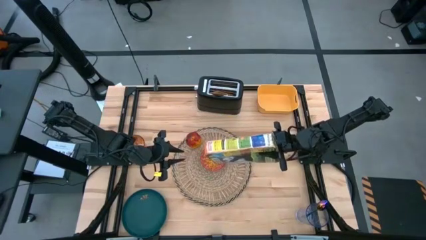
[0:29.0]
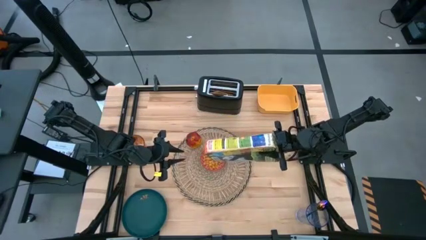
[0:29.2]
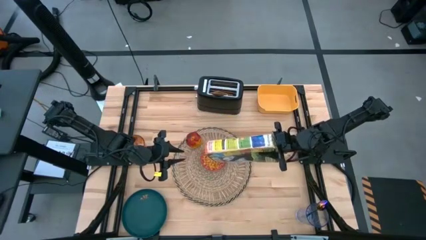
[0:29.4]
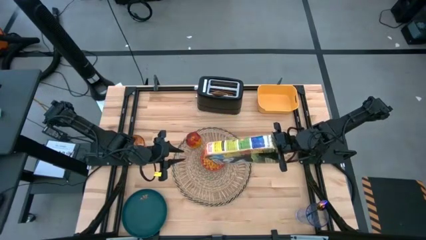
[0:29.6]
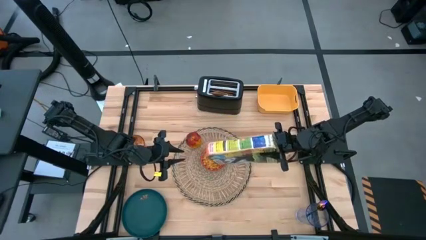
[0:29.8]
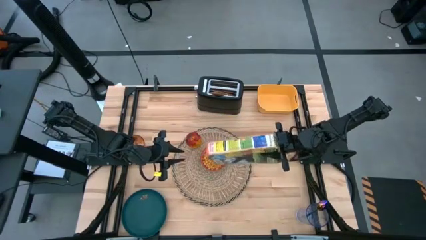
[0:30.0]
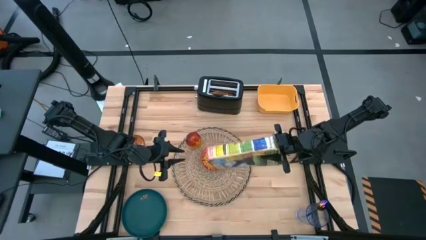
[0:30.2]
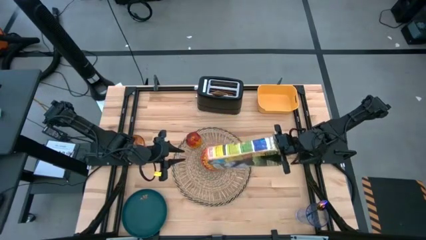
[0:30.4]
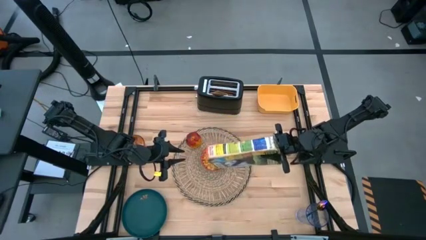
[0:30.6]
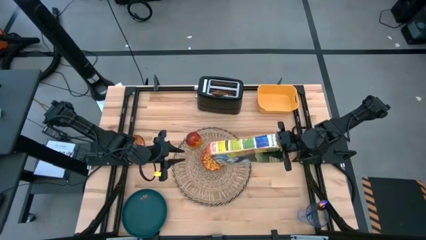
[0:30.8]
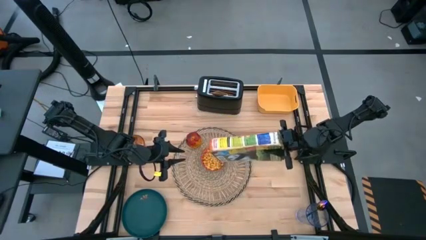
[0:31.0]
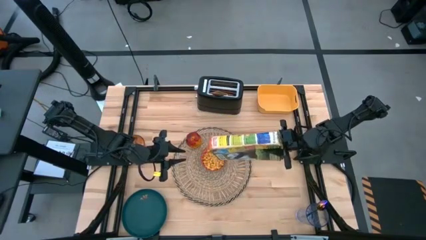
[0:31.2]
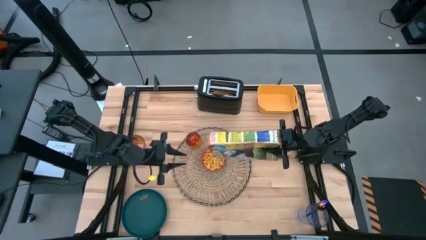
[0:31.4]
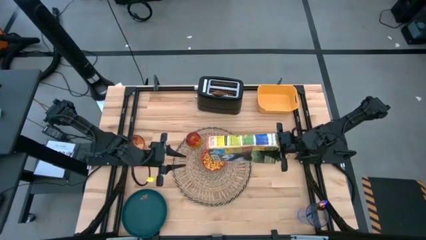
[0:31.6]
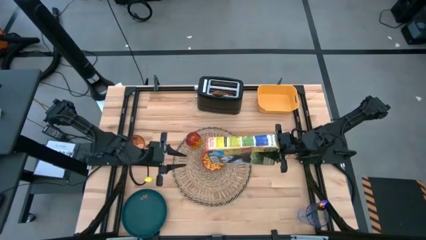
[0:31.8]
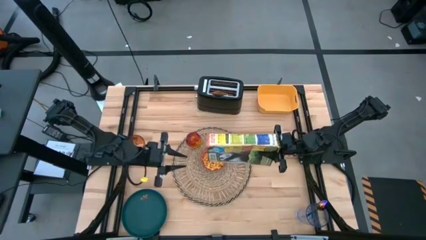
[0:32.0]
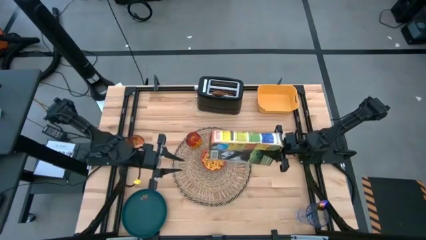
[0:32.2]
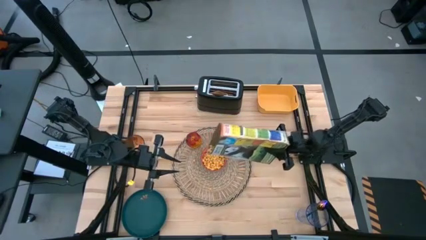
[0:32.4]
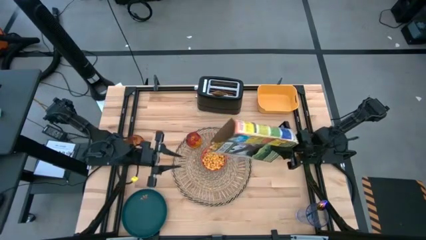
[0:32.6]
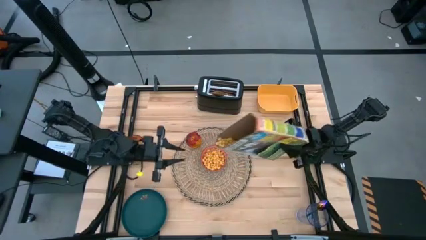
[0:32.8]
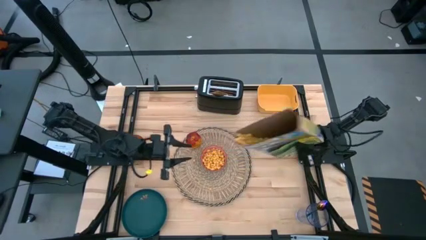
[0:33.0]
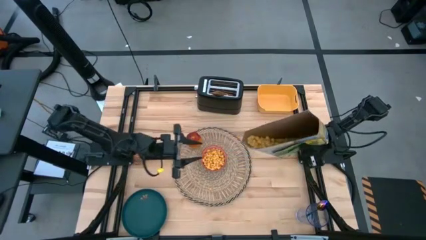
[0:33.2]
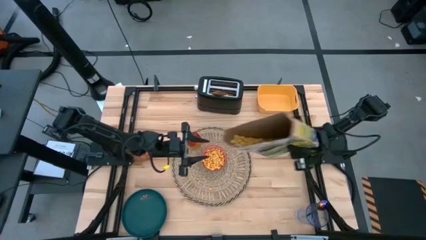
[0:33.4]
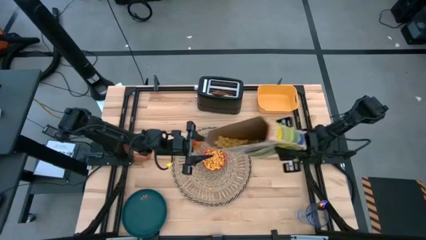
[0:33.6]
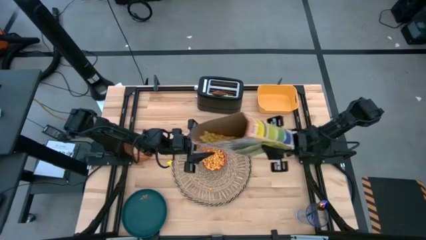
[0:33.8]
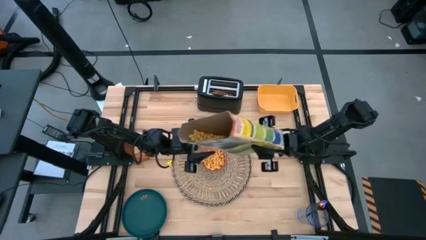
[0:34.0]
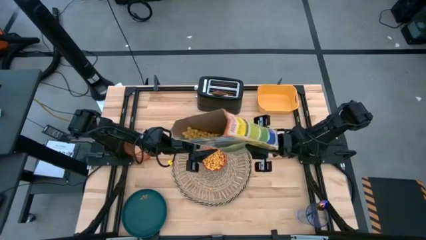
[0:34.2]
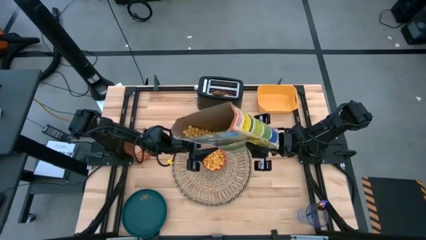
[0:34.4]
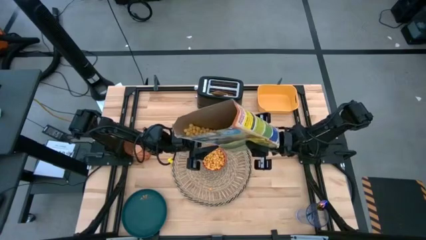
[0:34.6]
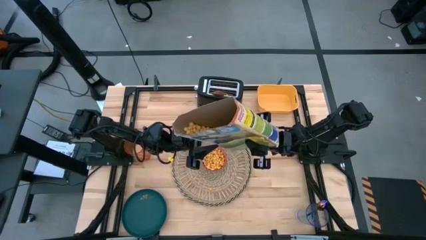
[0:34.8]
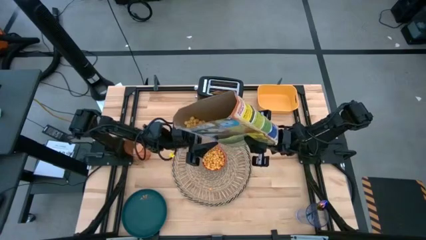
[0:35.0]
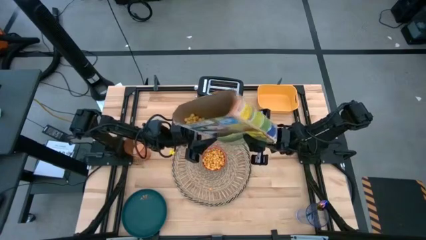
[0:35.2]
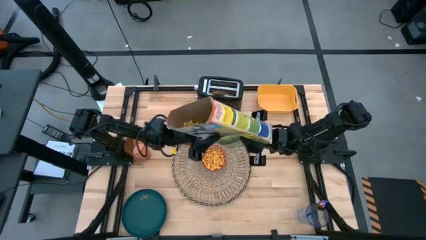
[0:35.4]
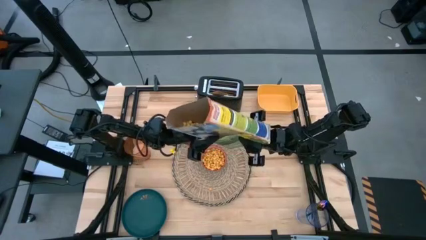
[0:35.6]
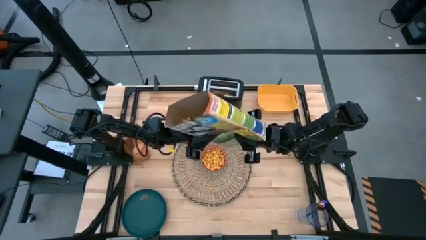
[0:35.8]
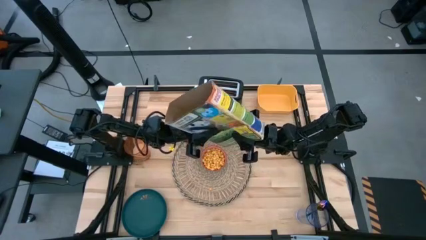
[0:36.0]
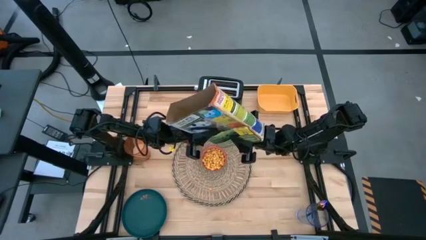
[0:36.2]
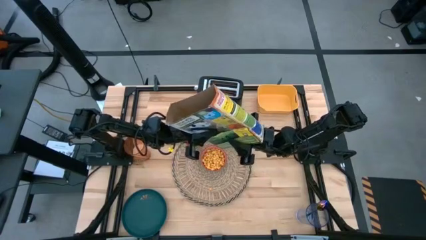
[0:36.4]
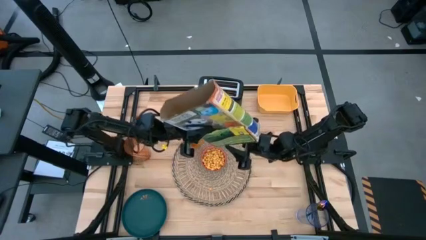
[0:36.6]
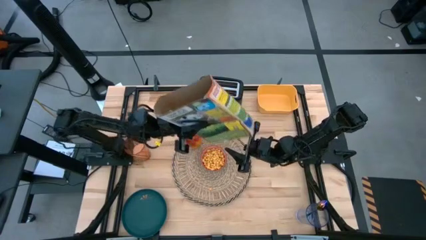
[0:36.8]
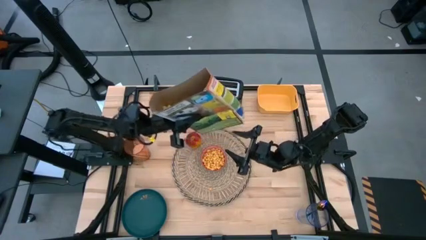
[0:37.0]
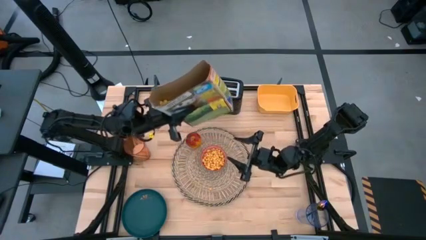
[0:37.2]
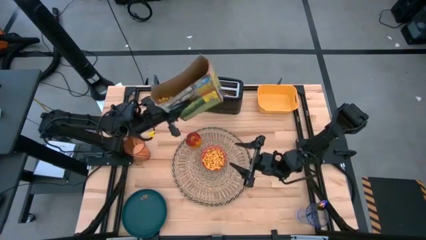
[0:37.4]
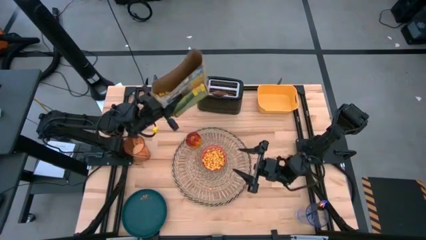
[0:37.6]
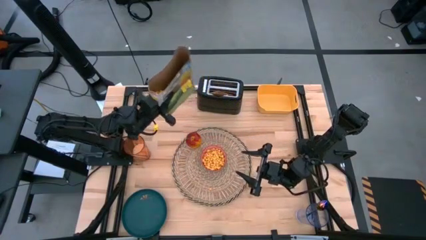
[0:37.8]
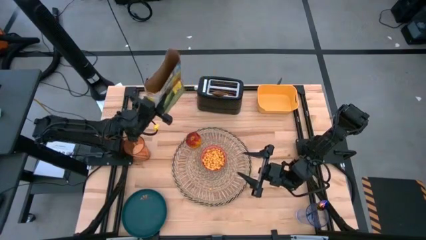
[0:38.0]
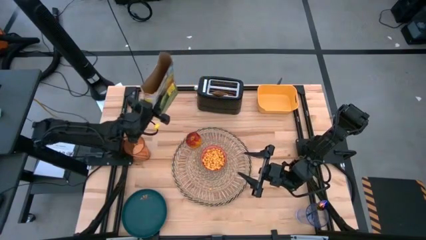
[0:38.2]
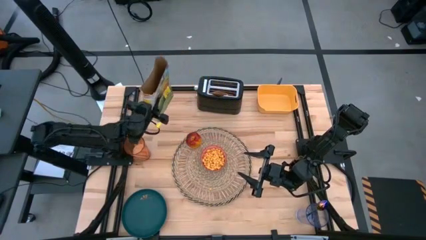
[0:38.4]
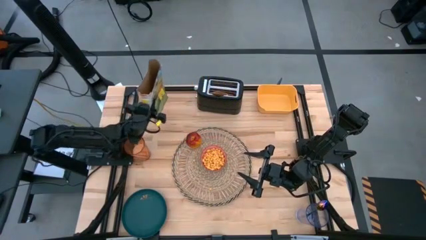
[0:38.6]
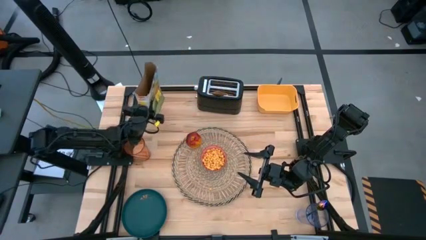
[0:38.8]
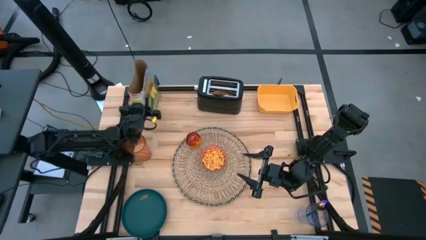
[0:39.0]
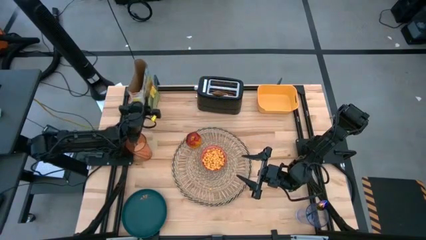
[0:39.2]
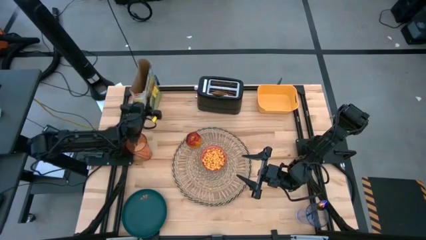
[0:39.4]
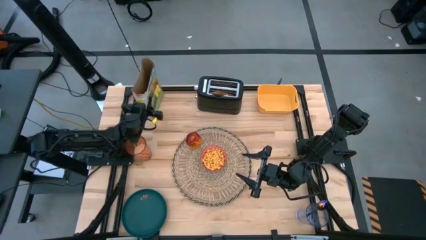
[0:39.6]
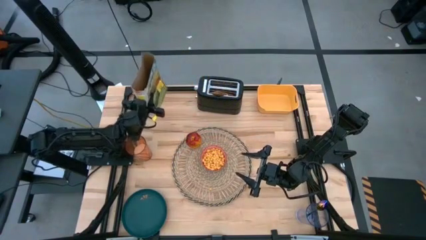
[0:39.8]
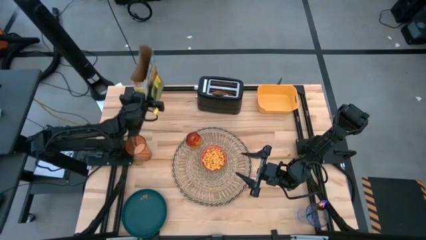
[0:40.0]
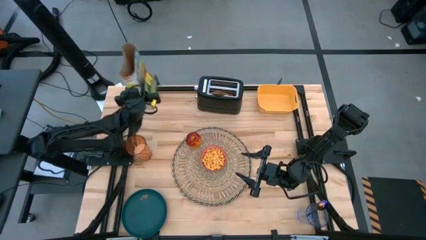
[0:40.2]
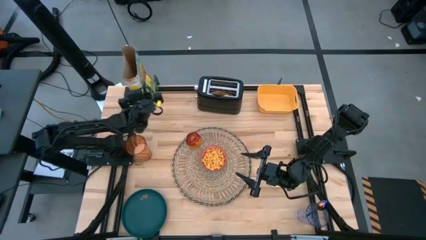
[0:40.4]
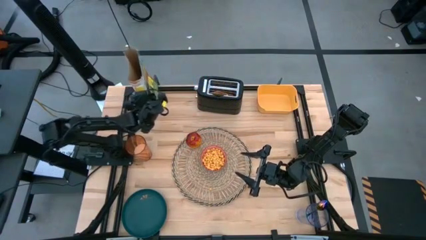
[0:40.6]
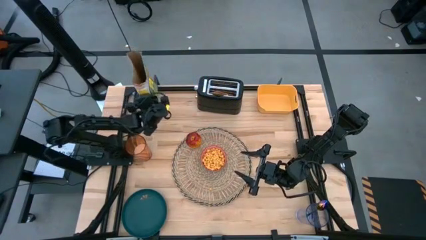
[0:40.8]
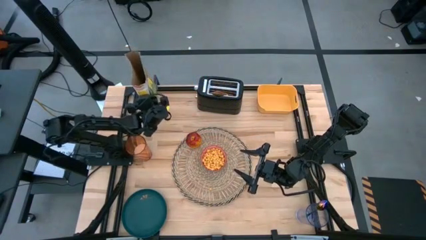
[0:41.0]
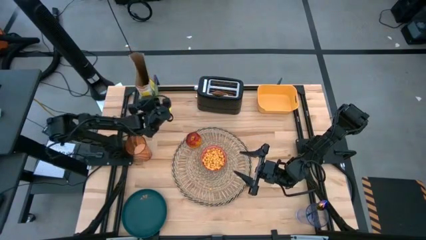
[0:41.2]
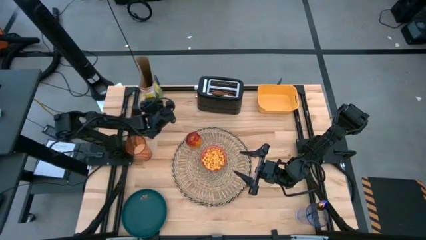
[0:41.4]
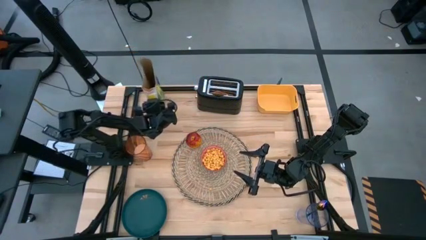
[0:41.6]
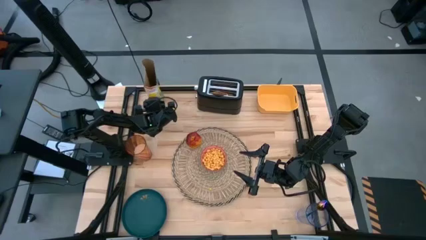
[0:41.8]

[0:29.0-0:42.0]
Task: Arrange a breakfast setting
Pour the cereal into the red patterned bowl

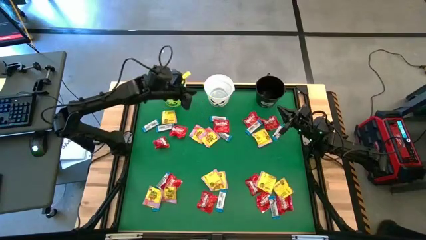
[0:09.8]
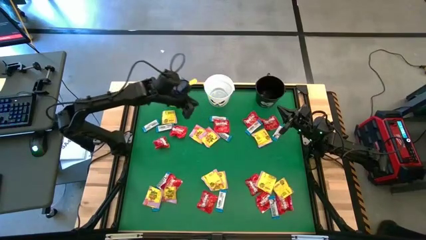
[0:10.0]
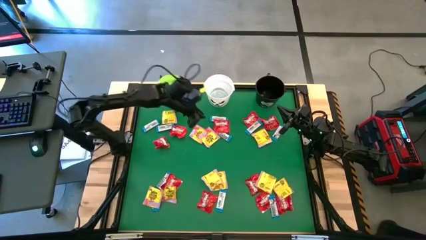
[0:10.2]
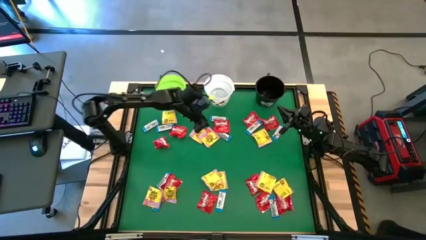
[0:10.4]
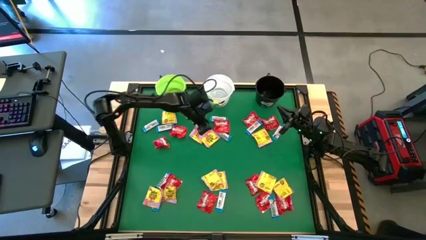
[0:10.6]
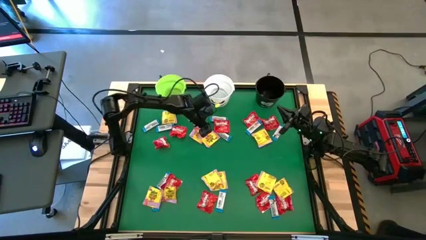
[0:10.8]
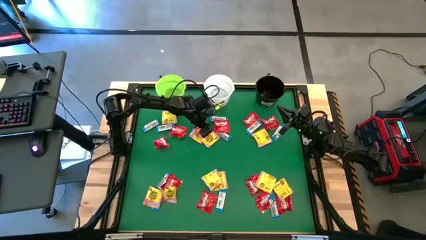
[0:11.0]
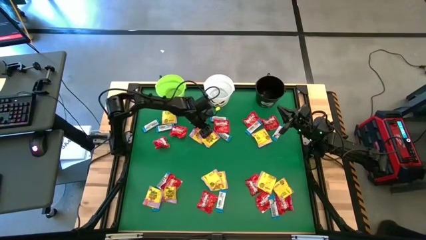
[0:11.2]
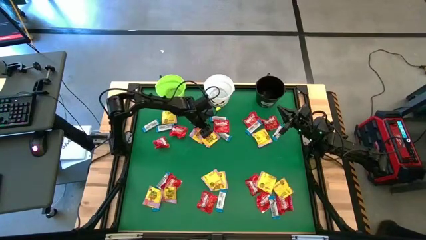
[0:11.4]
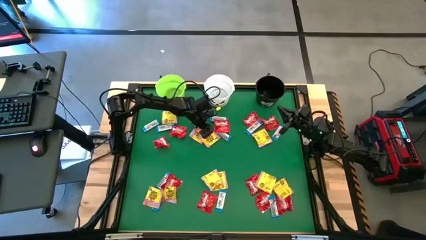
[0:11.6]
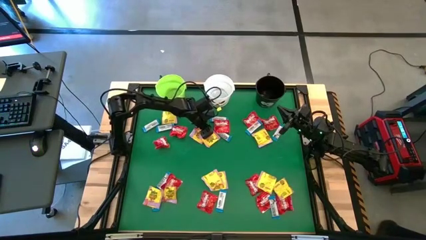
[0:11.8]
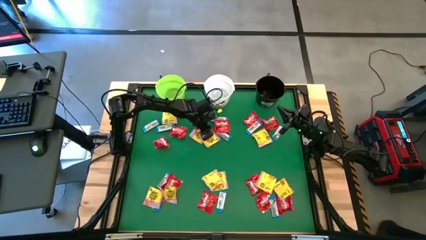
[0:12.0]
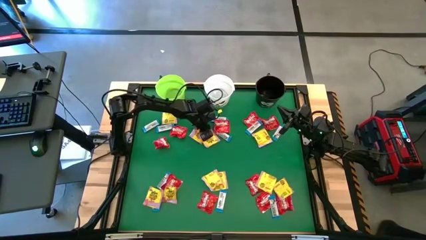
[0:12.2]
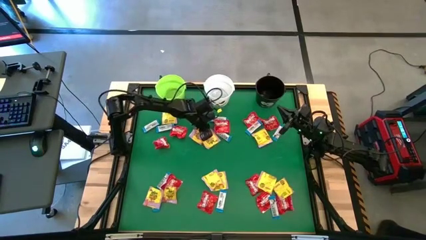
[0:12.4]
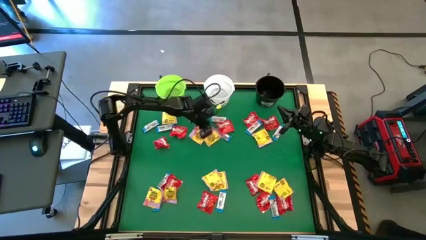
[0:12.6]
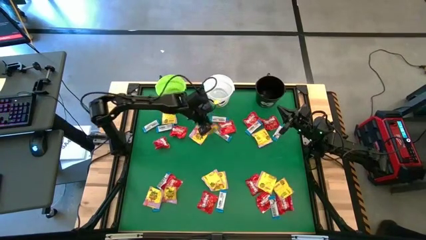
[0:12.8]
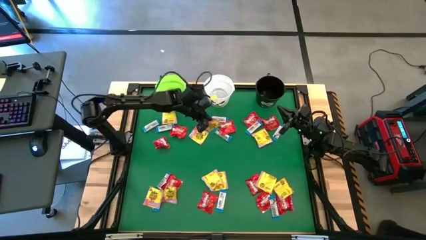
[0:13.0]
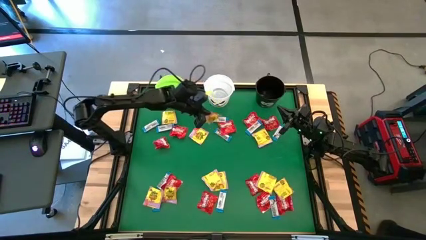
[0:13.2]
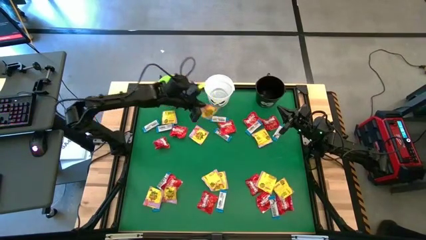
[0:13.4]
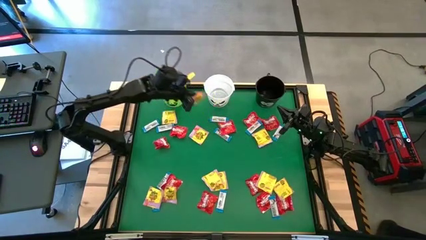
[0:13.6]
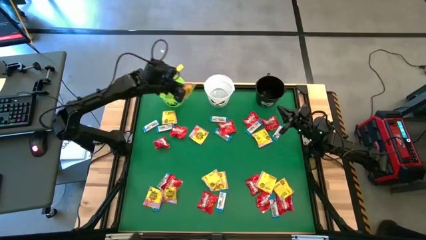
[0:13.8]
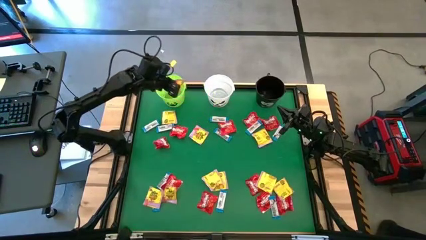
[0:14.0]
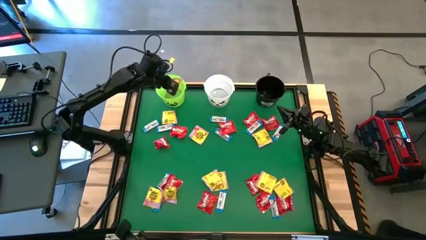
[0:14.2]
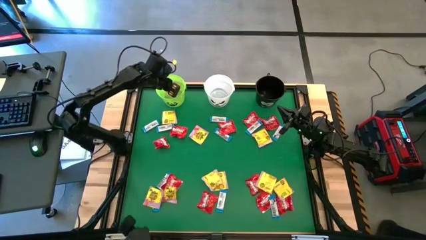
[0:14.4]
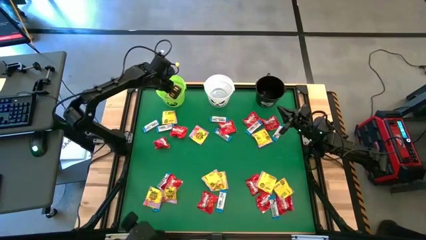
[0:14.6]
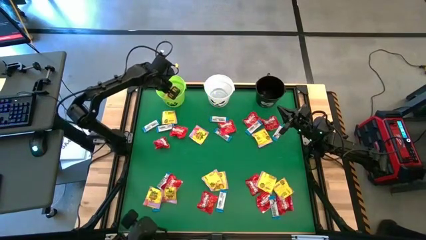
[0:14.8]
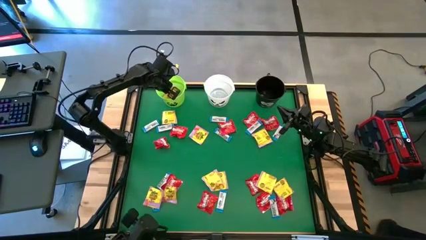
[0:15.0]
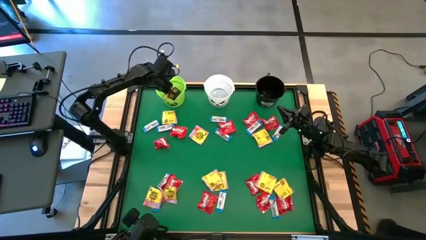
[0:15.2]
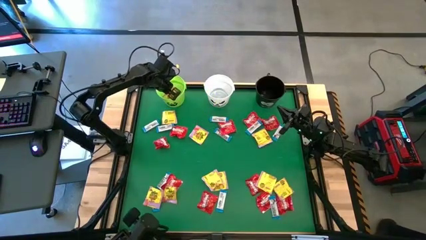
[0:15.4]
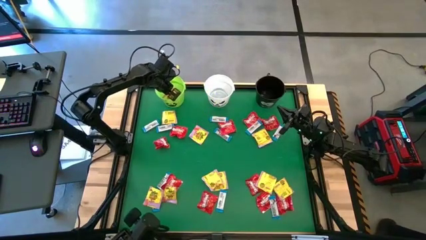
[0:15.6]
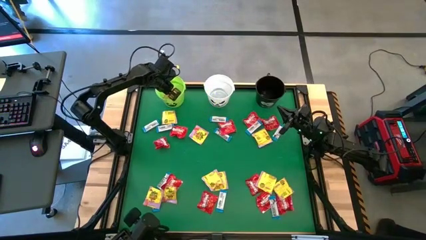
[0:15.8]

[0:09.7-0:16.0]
Task: Sort candy by brand, put in halloween buckets
Put the yellow candy into the green bucket
